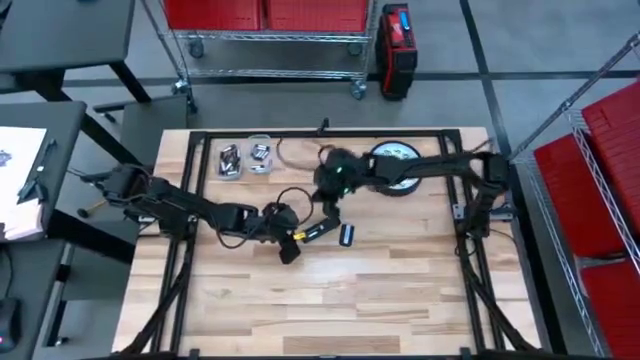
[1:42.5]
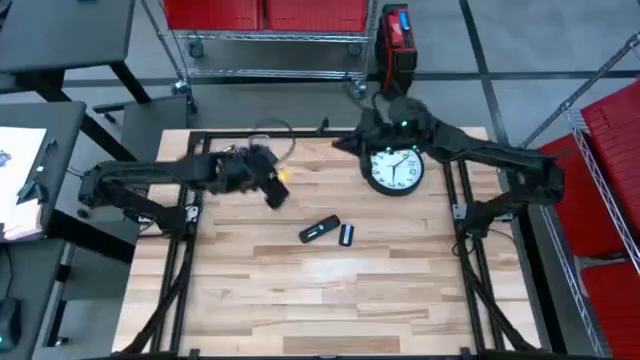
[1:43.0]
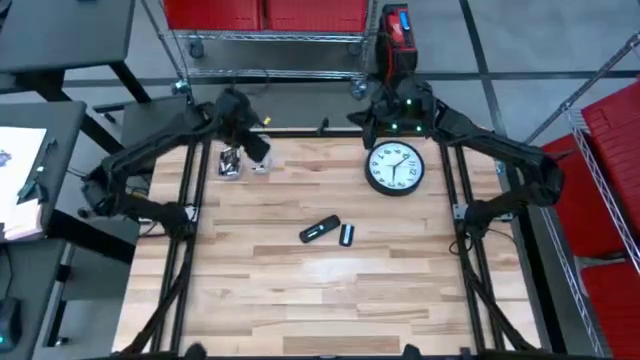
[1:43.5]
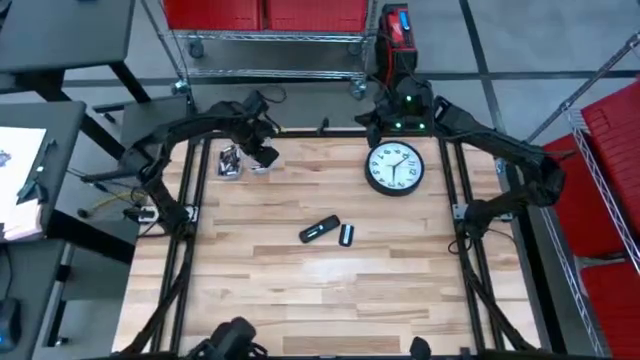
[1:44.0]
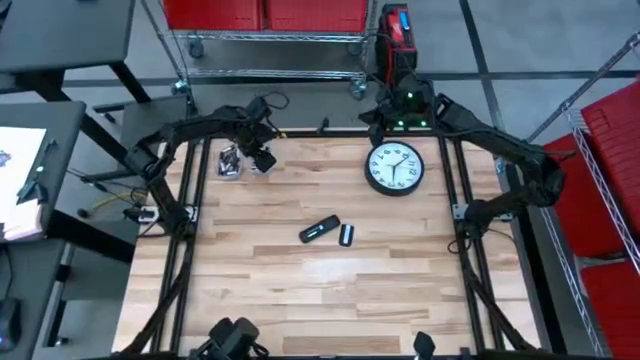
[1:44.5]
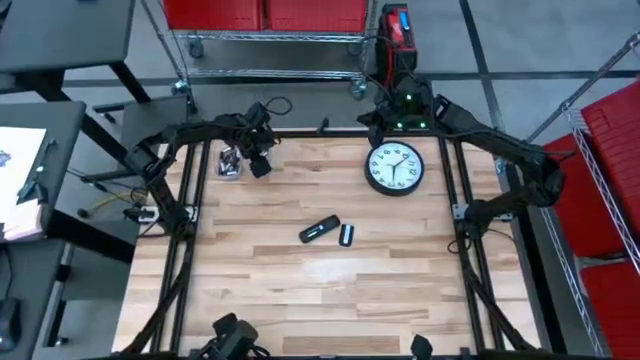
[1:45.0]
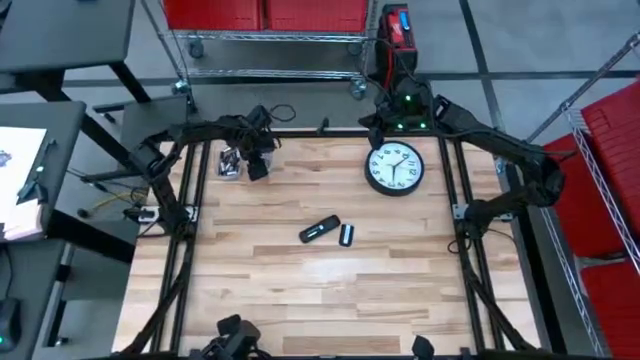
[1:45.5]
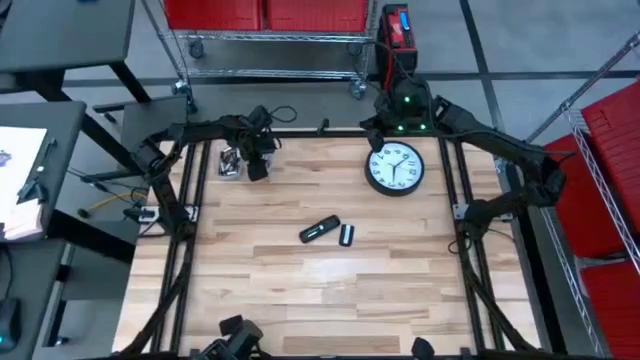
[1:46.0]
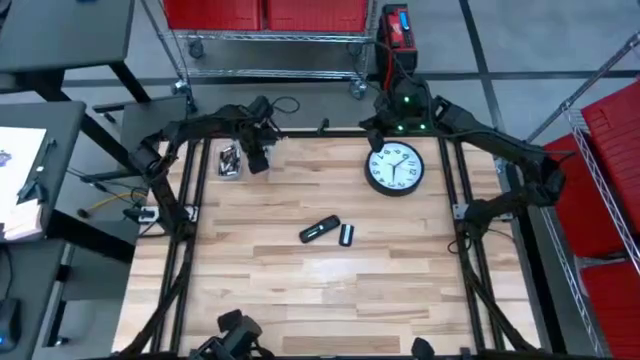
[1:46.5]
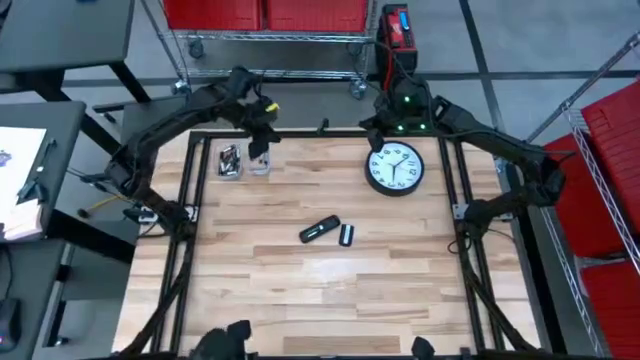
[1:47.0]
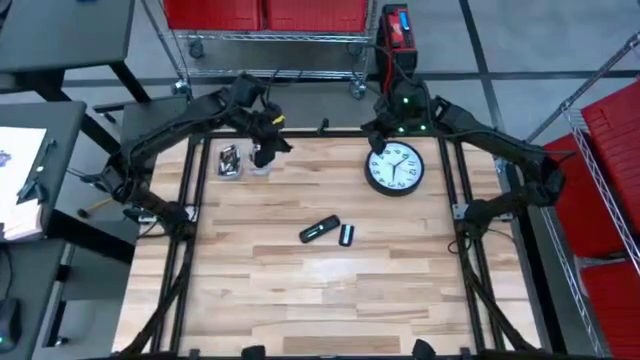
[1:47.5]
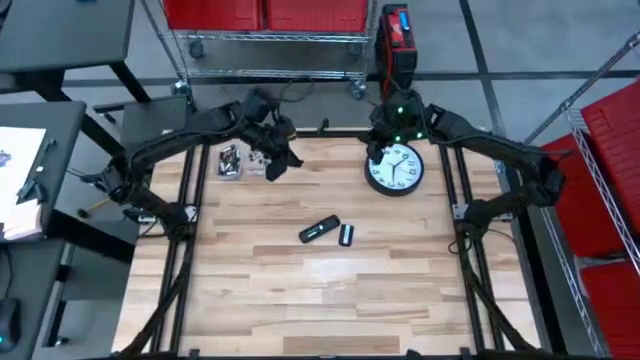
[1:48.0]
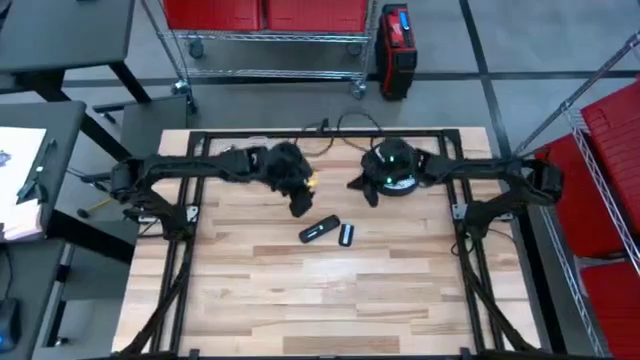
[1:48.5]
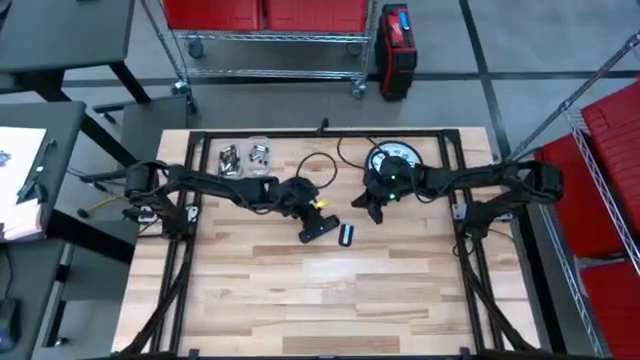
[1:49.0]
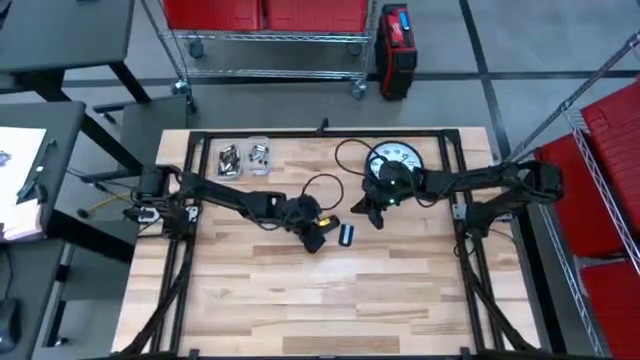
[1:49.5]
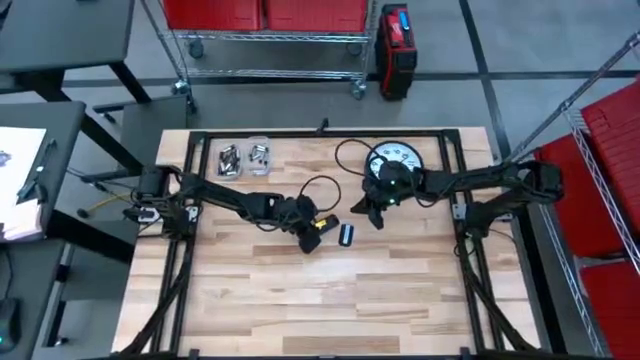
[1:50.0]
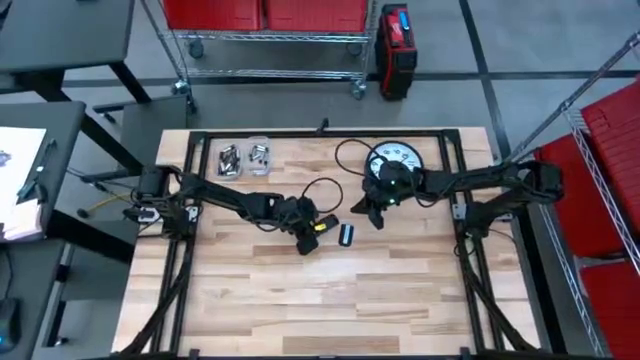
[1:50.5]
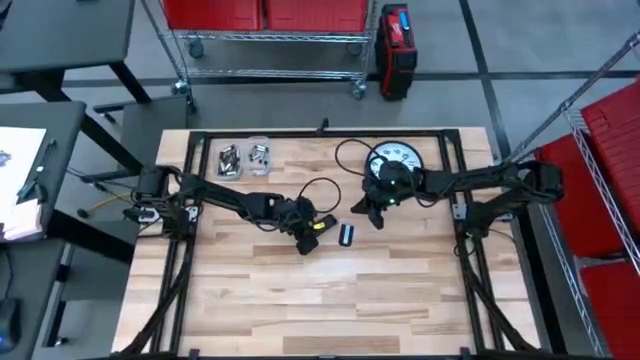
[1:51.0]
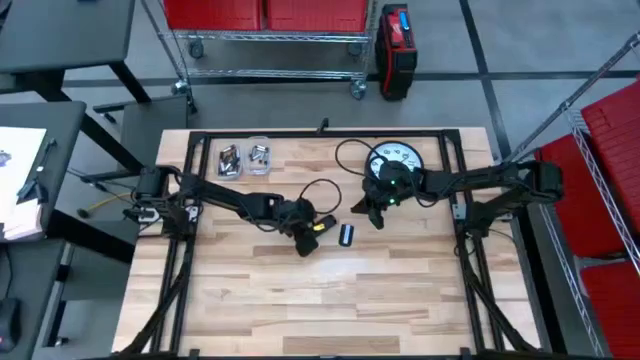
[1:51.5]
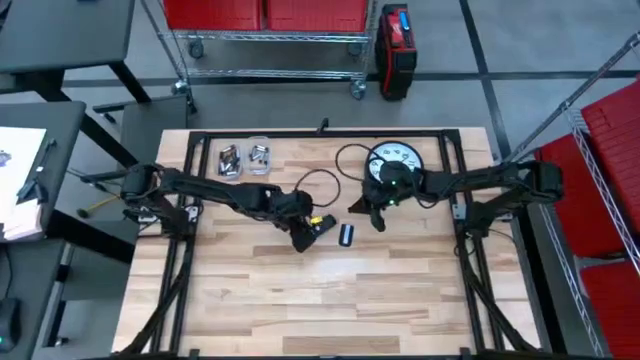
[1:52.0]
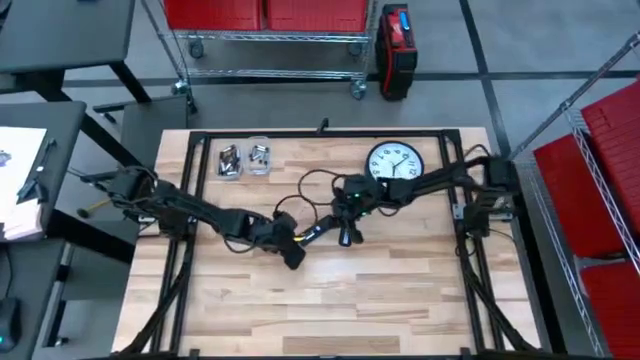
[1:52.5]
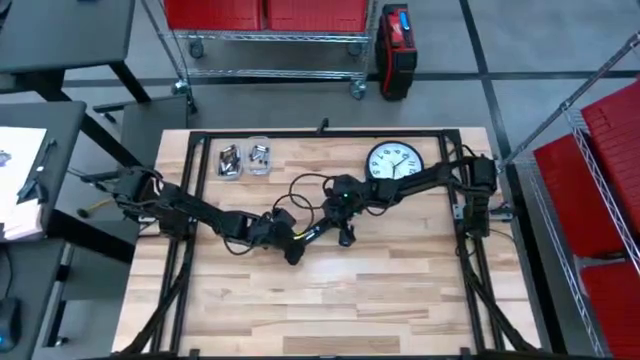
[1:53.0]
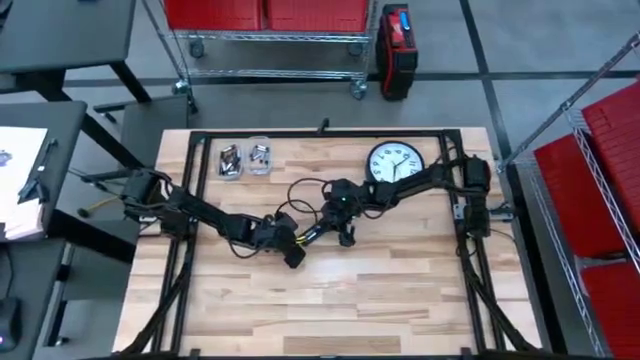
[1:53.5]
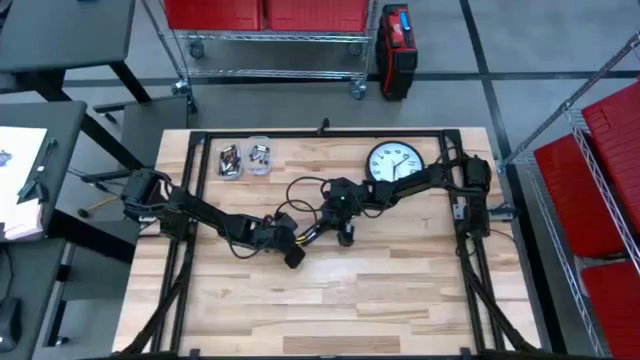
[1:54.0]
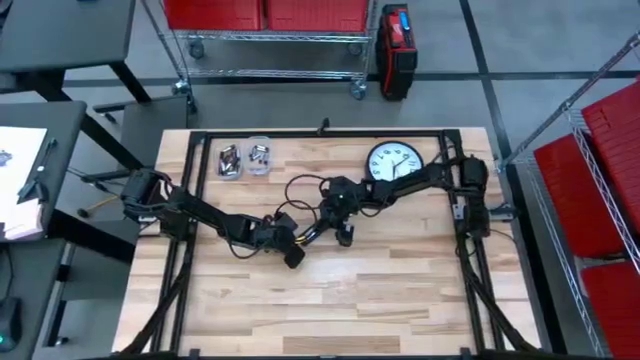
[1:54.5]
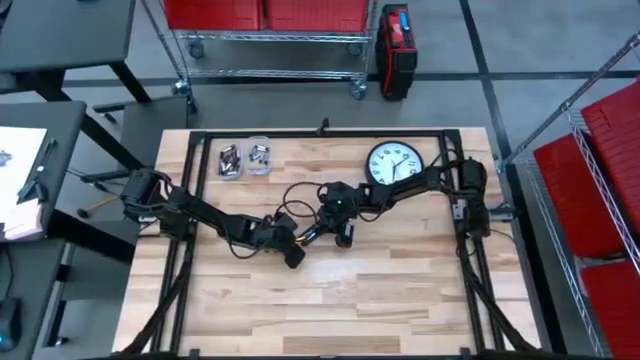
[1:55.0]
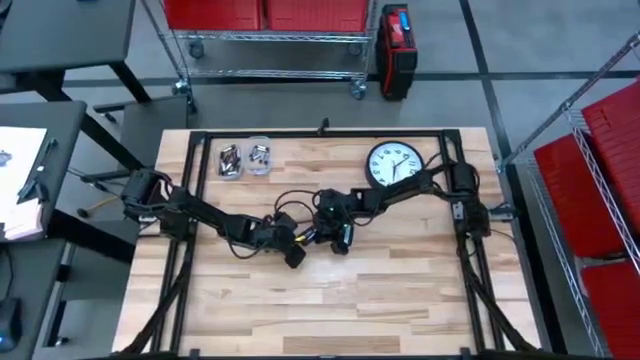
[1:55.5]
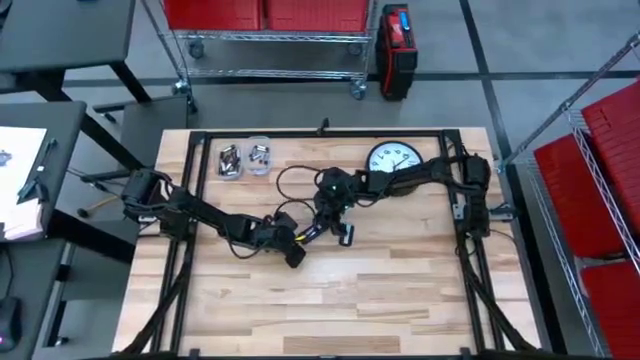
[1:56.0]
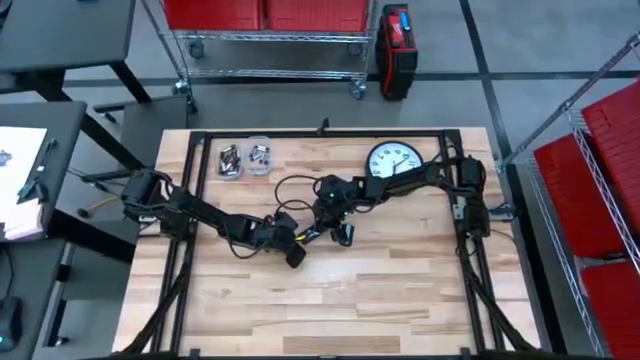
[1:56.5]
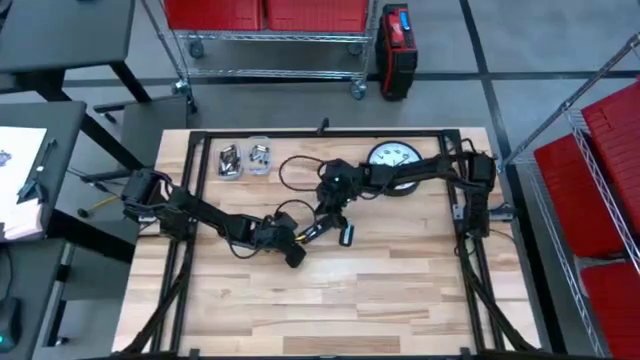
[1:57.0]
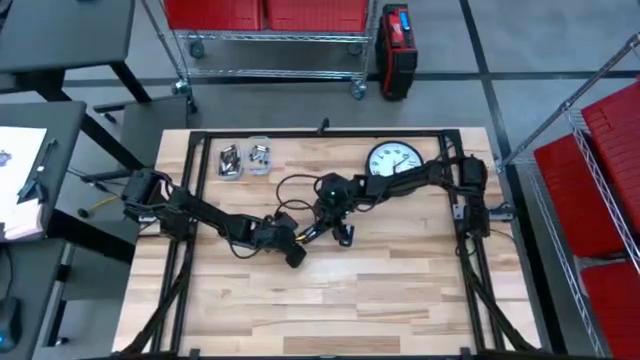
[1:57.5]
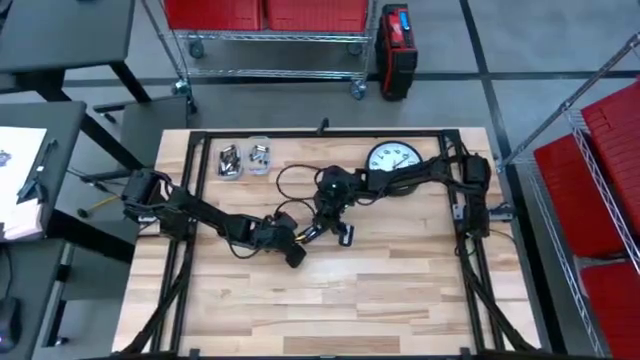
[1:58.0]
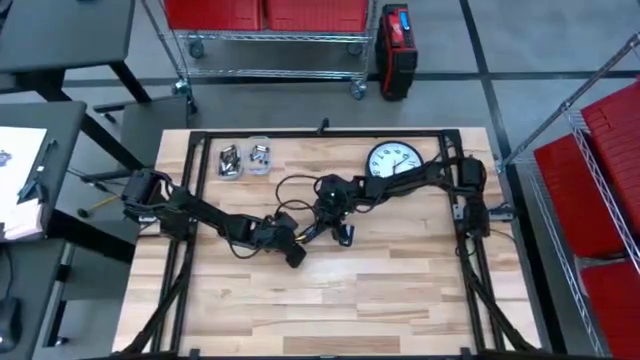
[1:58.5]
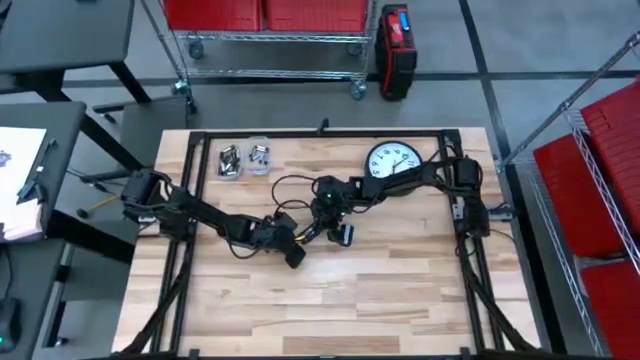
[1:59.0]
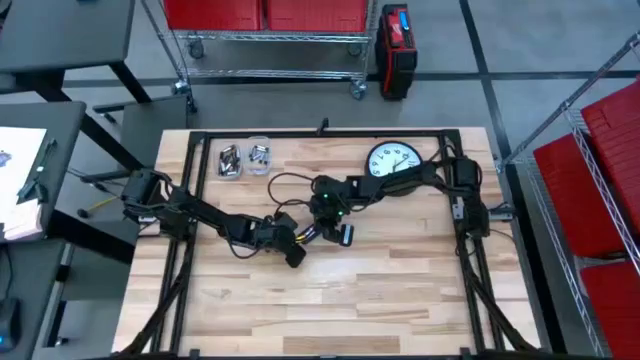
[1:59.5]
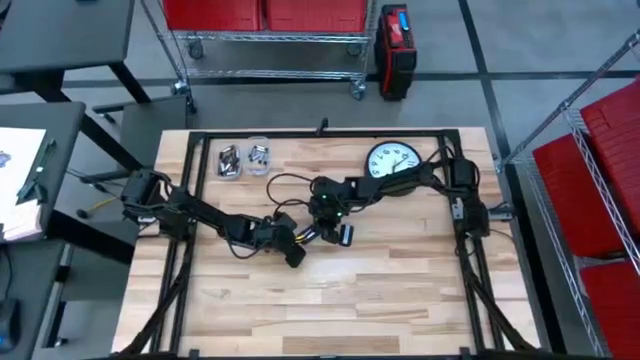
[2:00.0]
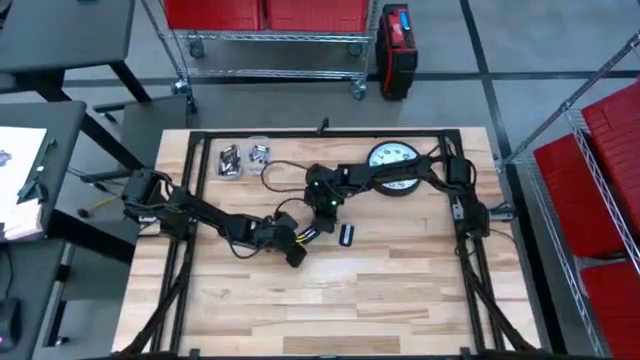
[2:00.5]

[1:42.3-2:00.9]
Task: Insert battery
Insert the silver battery into the remote battery compartment

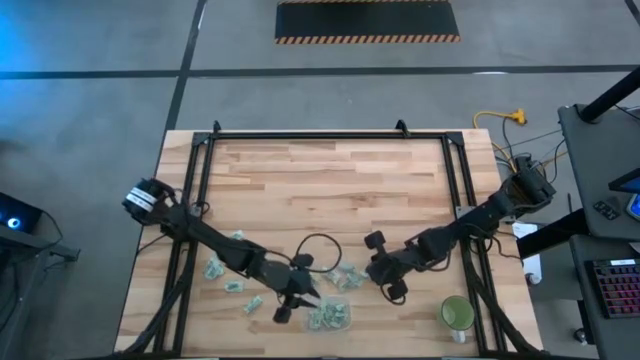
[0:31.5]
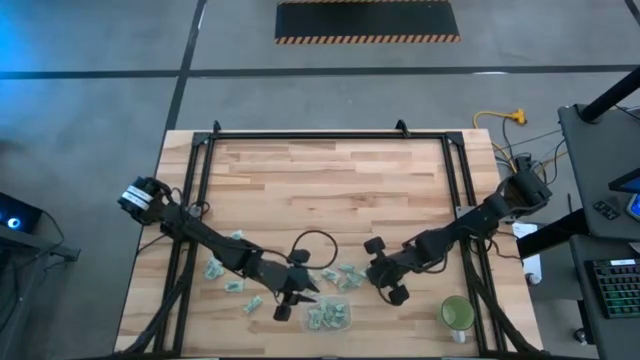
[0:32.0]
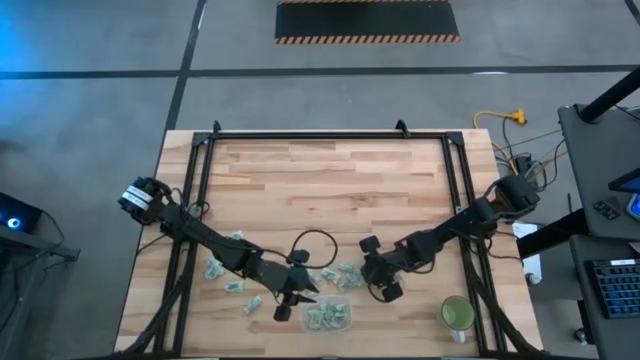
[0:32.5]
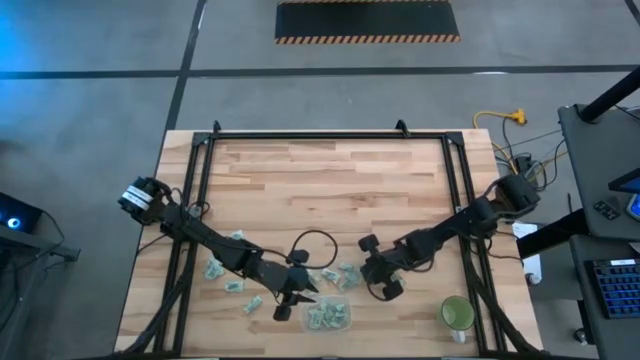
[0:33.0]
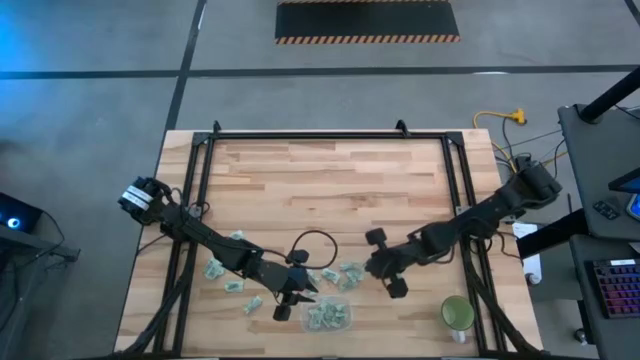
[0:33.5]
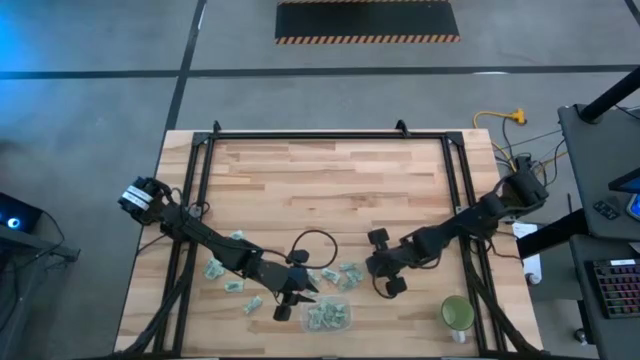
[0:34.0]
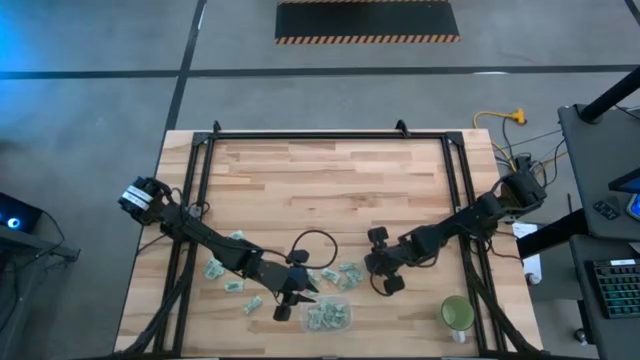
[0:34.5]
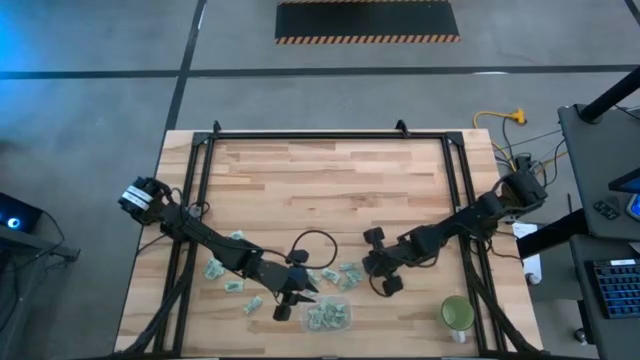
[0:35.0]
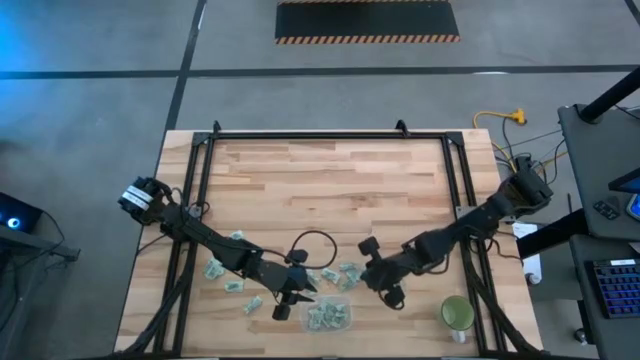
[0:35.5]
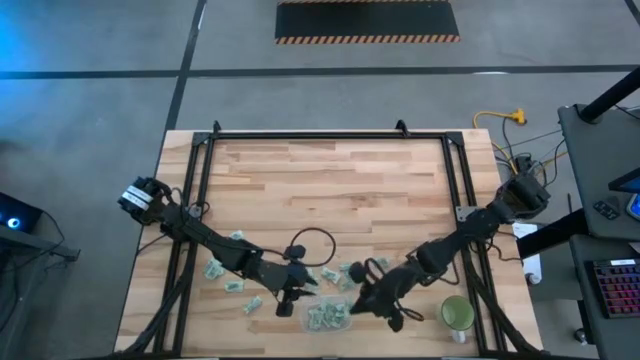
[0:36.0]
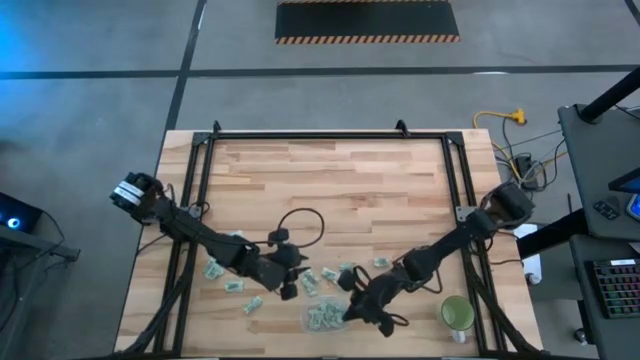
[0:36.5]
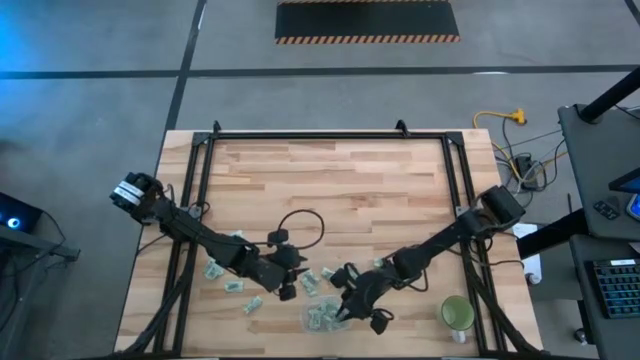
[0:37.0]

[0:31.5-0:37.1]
Task: Pick and place Stevia / Truvia into bins
Put the stevia packet into the transparent container
